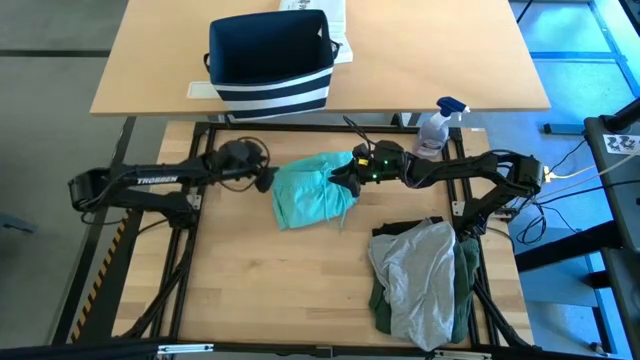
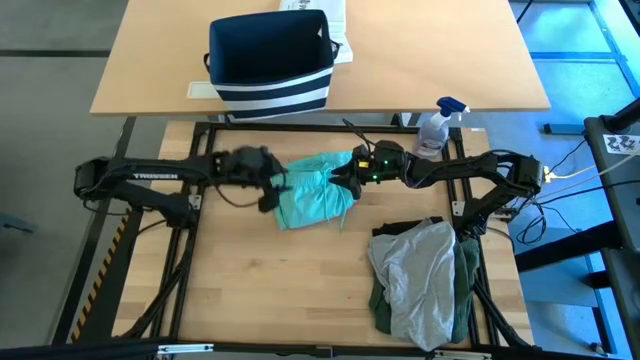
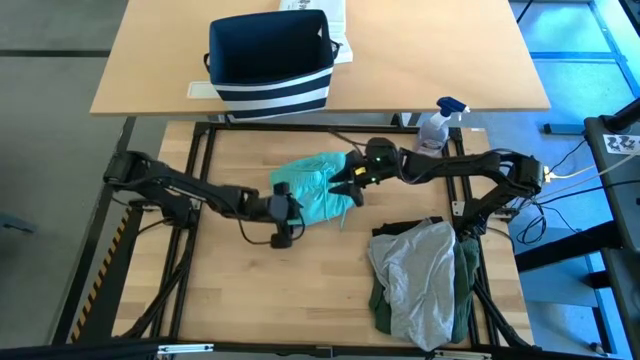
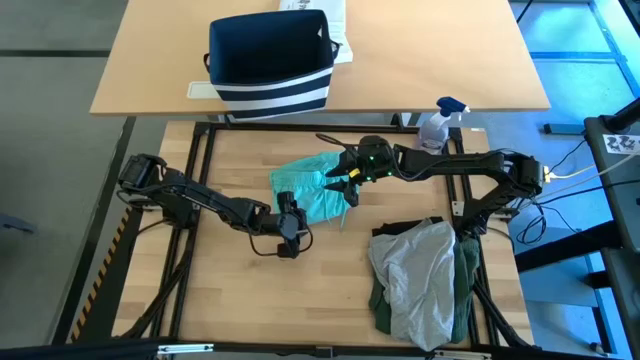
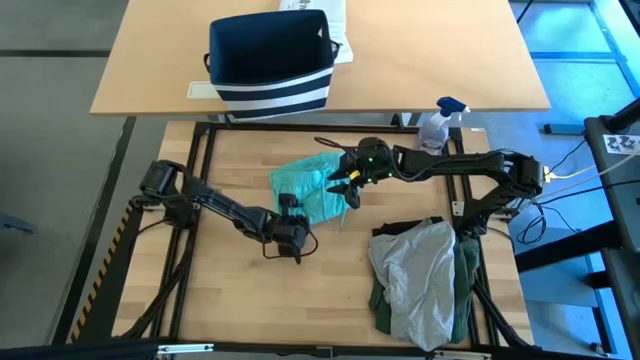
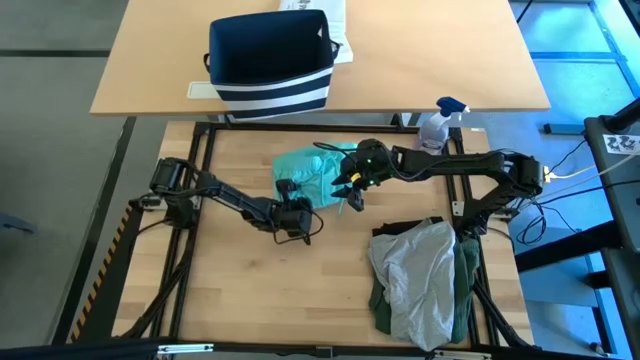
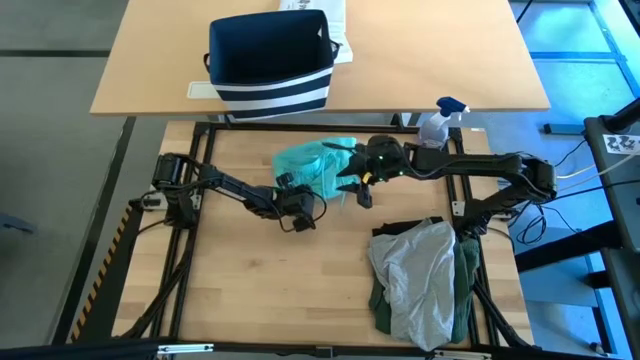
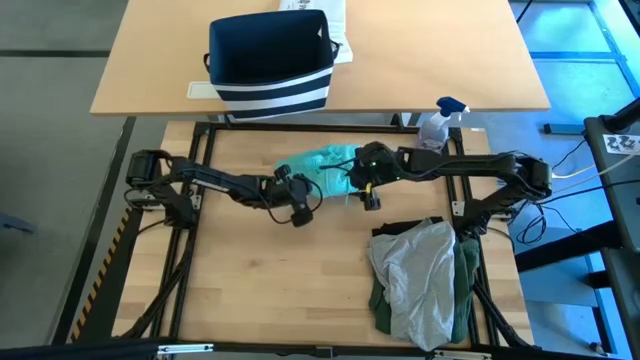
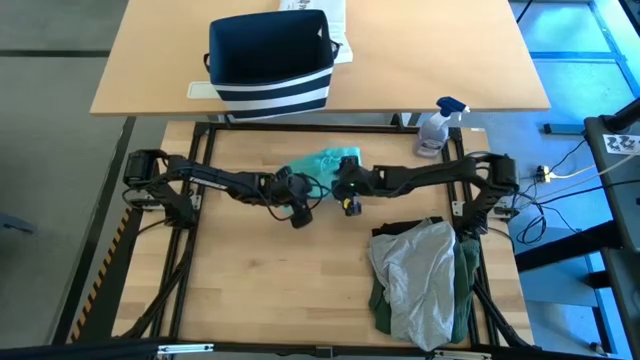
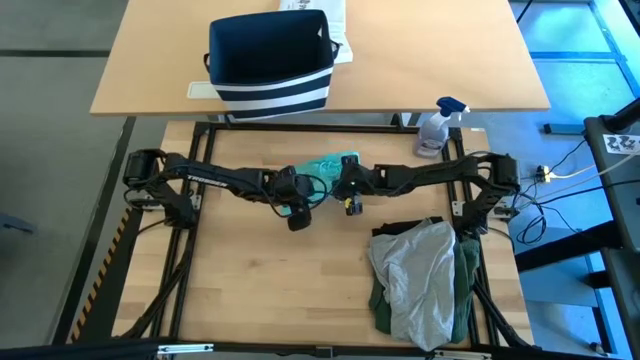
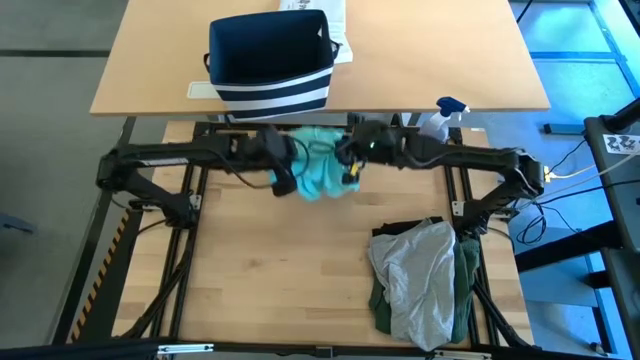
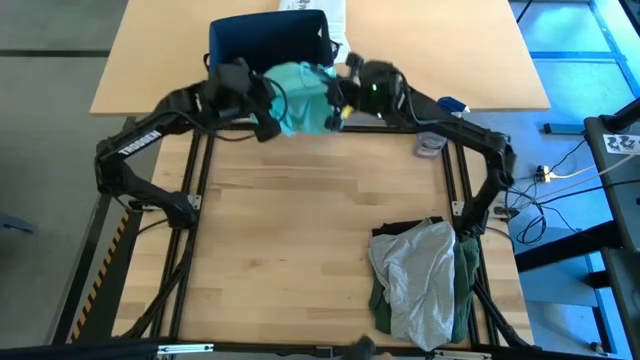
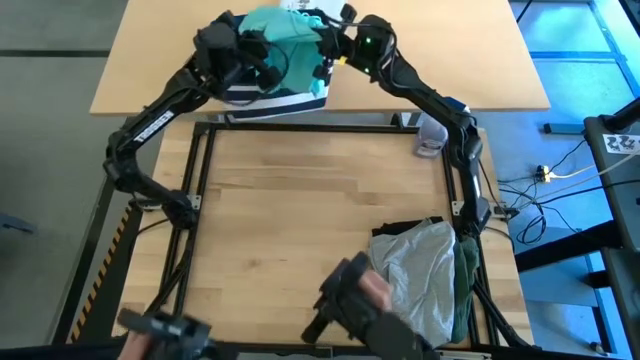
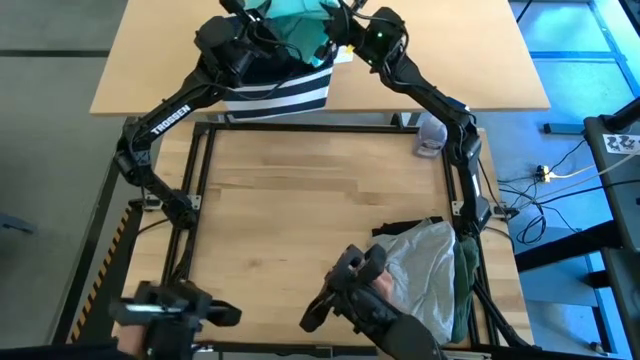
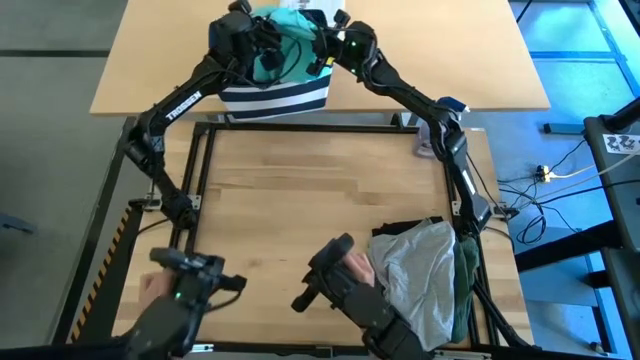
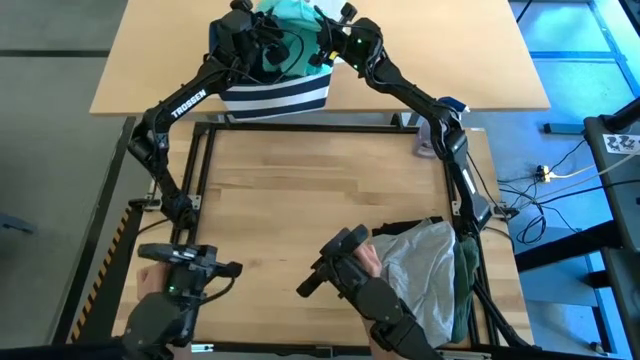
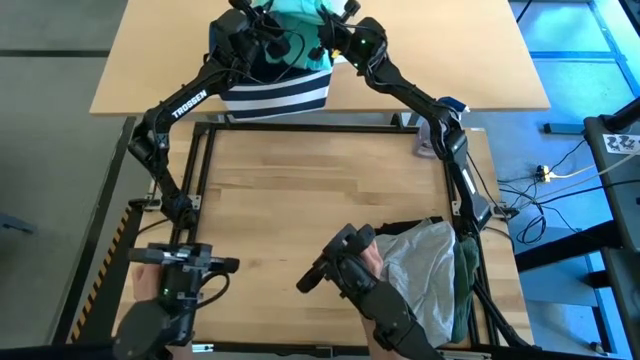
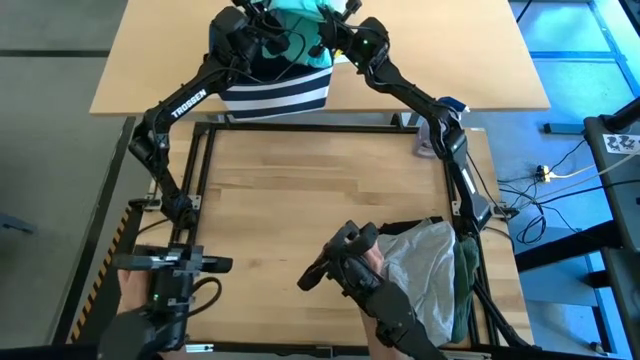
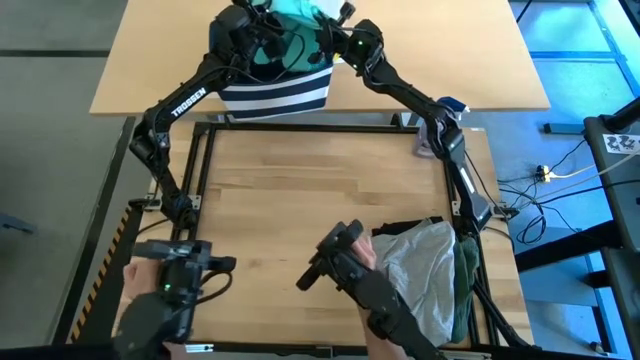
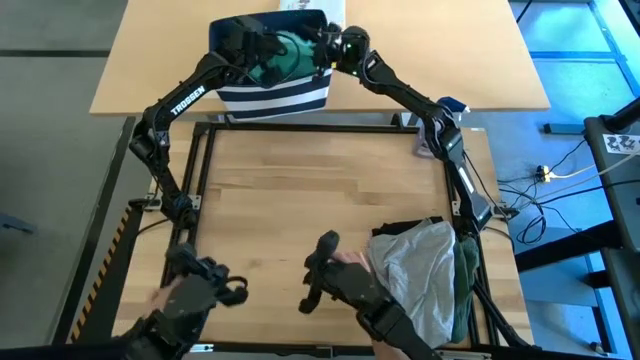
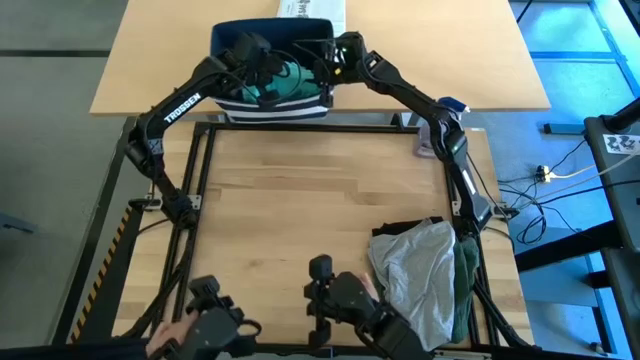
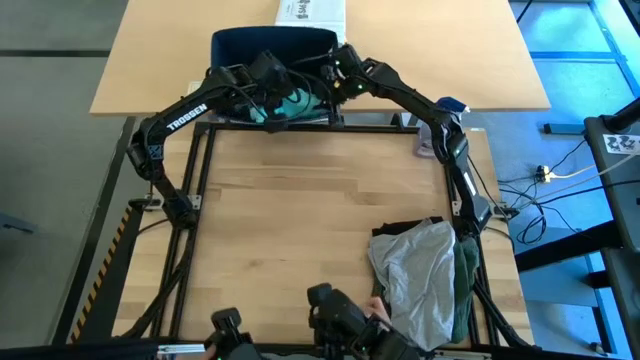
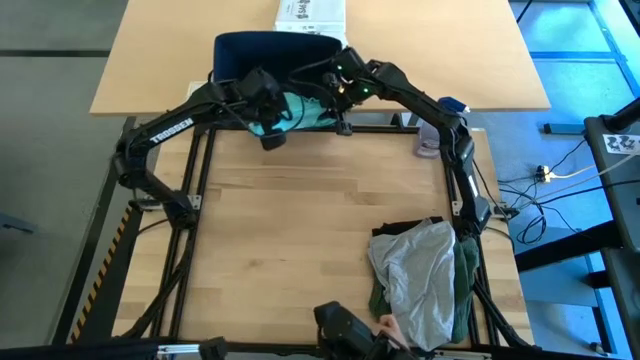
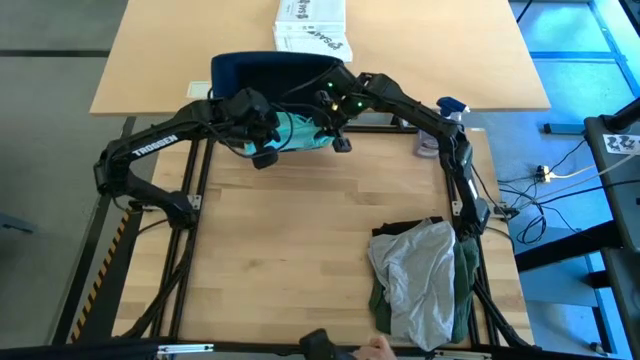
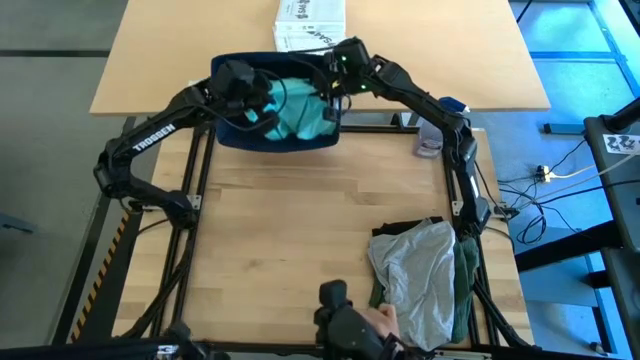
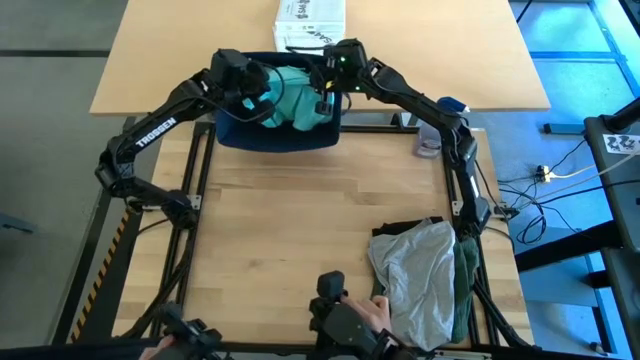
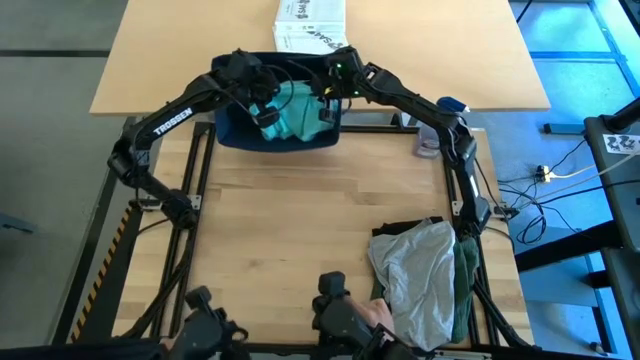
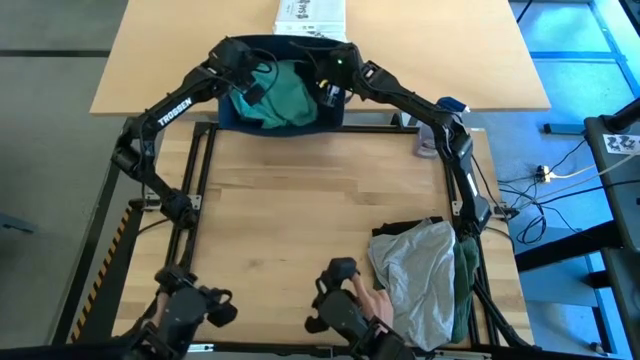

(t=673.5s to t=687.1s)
Task: Fold Laundry from Bin
Put the folded blue shorts into the blue bin

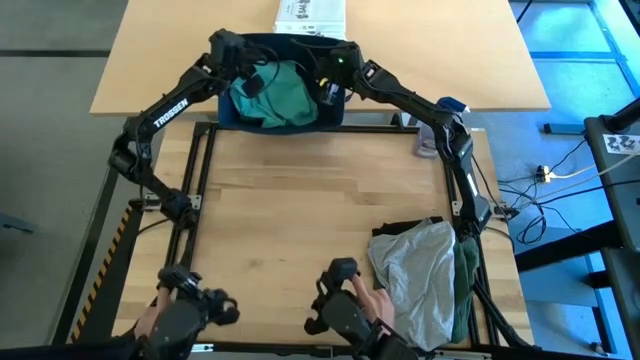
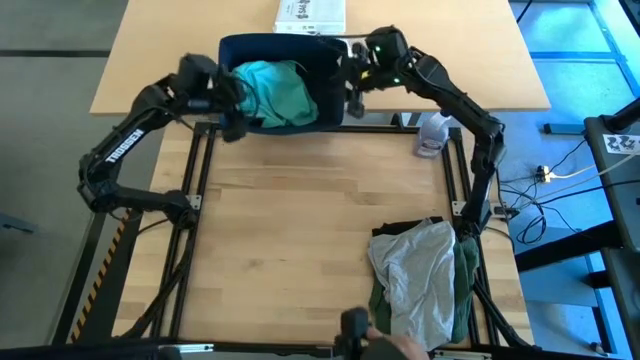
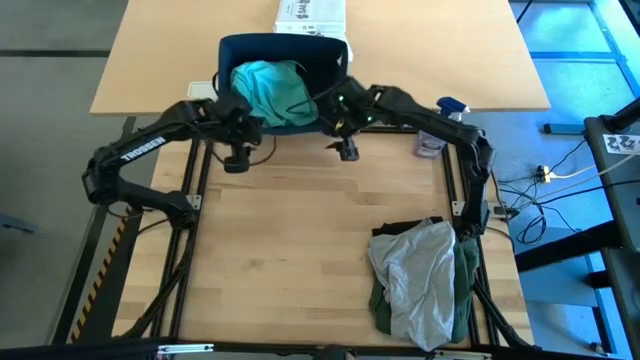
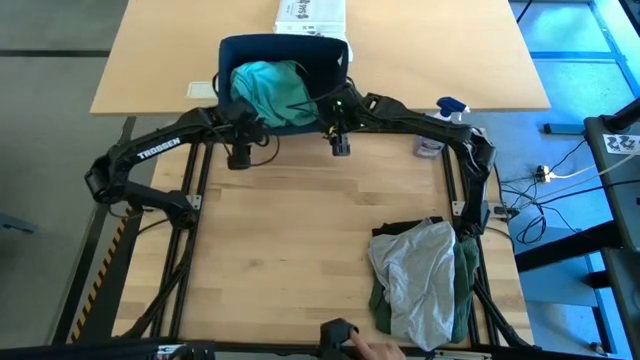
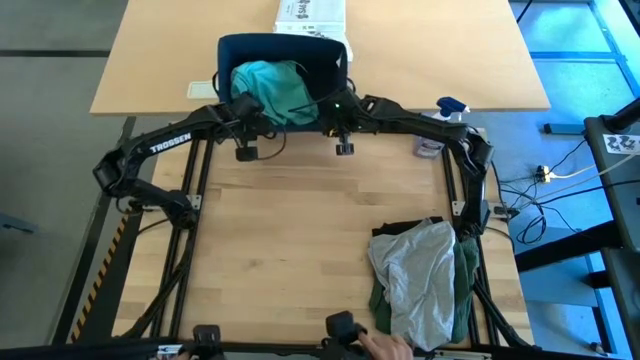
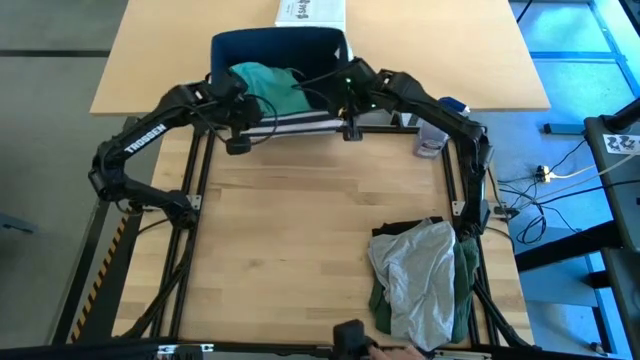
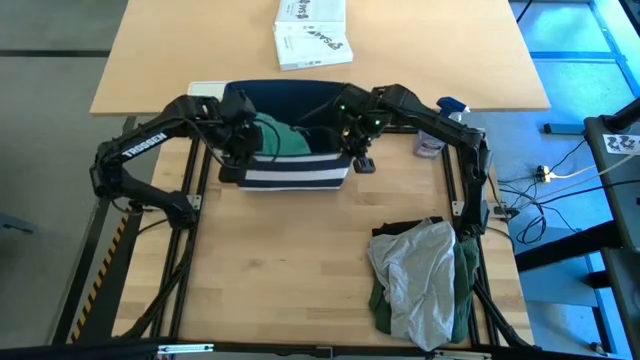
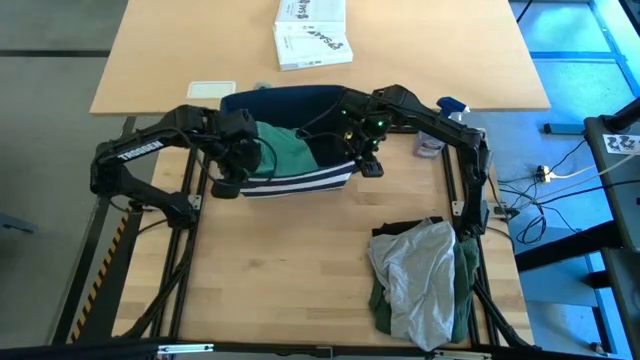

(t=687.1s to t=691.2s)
Adjust the blue bin

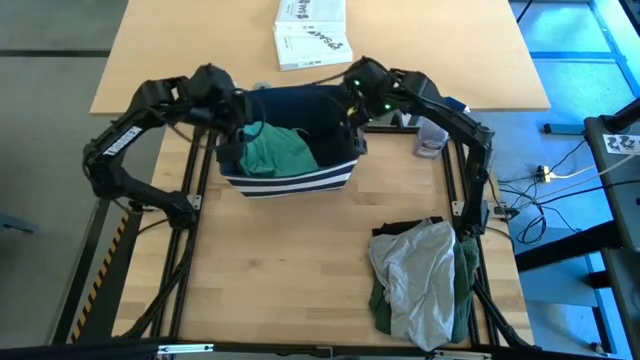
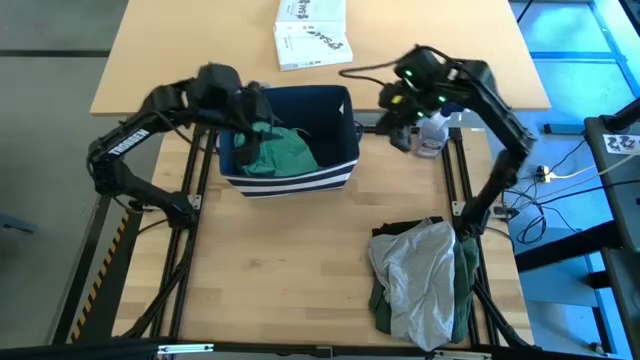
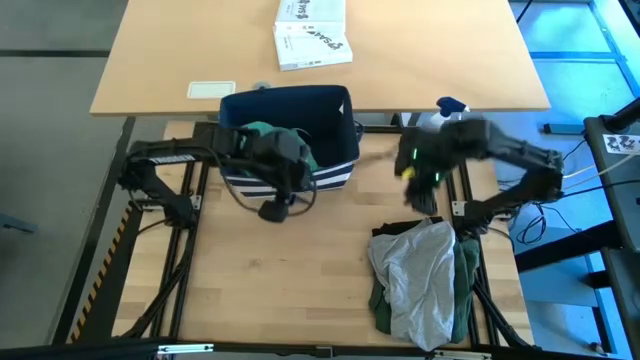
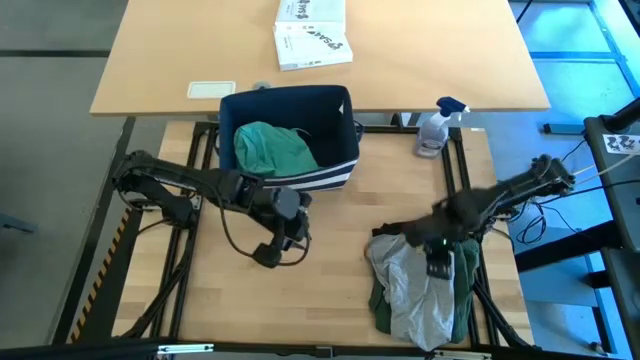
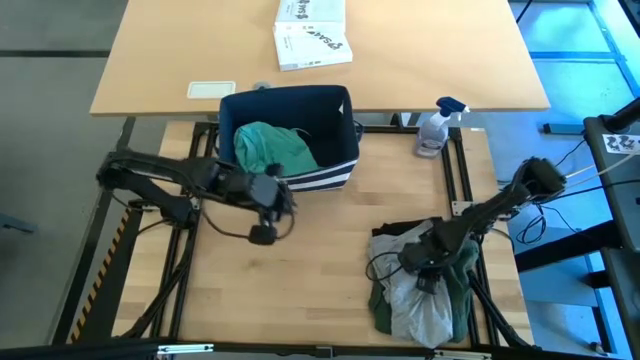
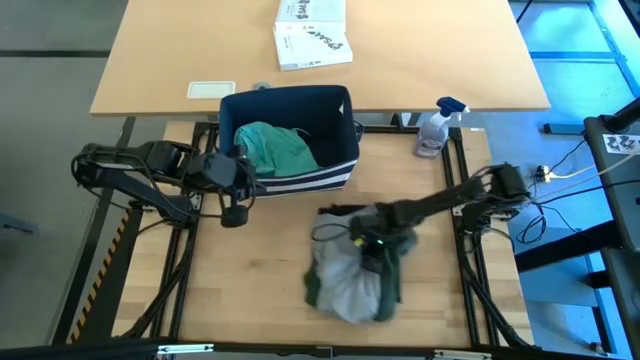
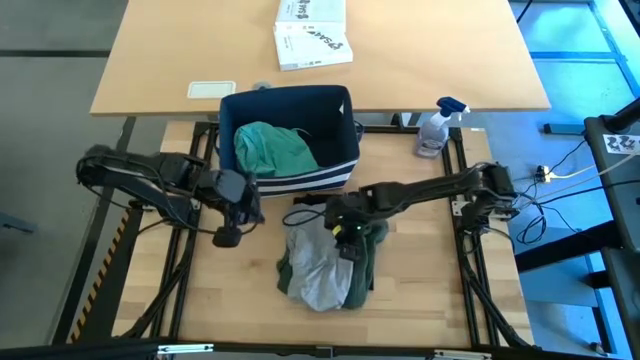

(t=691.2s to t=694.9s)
Move the stack of folded clothes to the center of the table
